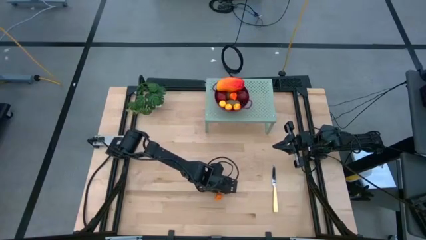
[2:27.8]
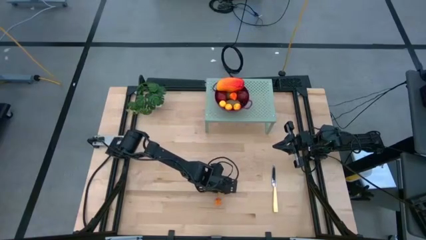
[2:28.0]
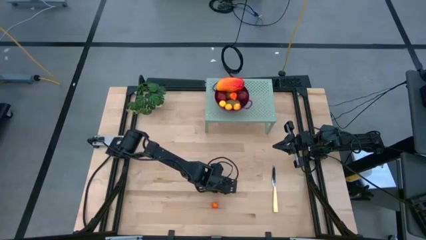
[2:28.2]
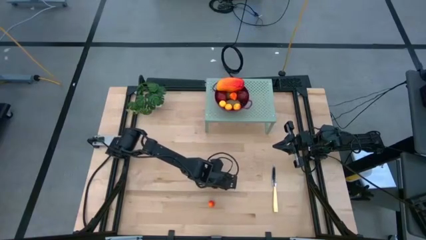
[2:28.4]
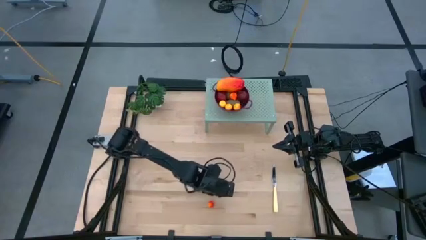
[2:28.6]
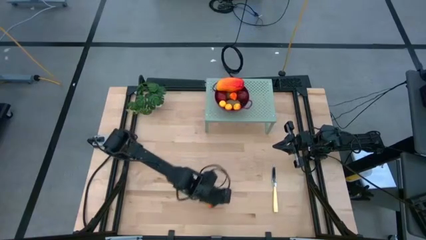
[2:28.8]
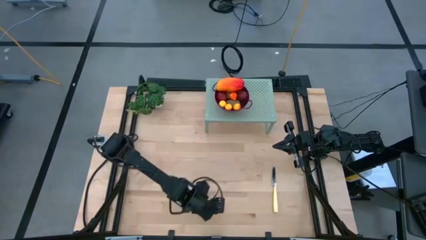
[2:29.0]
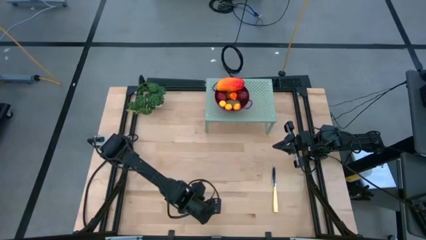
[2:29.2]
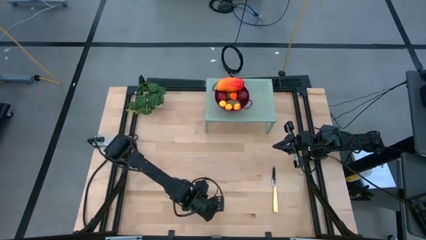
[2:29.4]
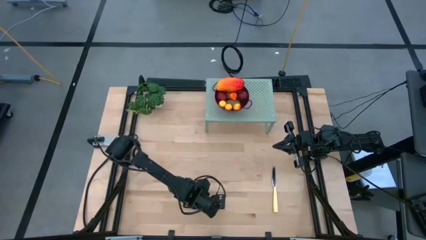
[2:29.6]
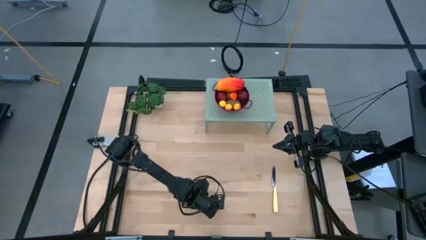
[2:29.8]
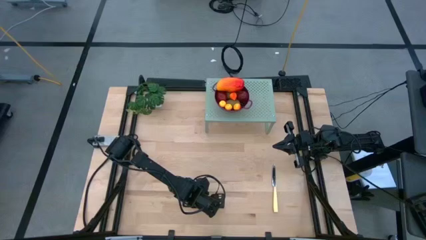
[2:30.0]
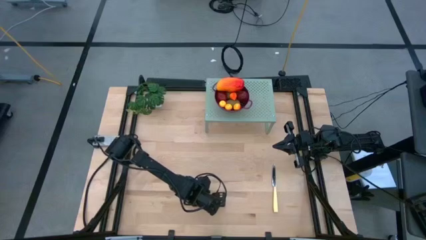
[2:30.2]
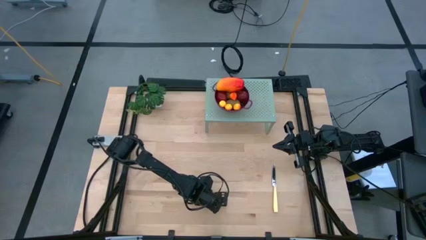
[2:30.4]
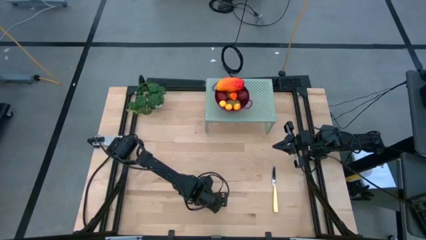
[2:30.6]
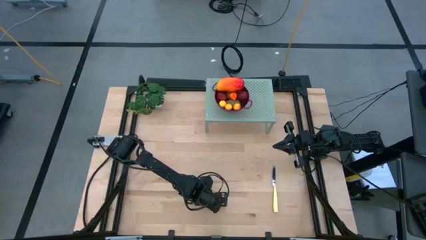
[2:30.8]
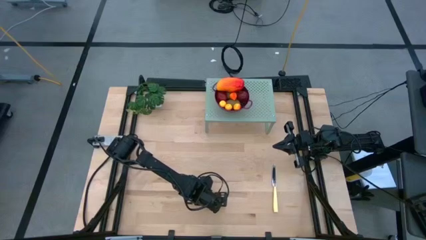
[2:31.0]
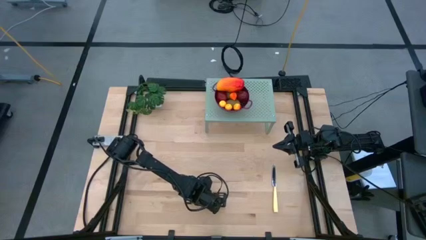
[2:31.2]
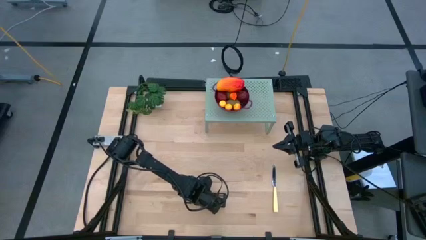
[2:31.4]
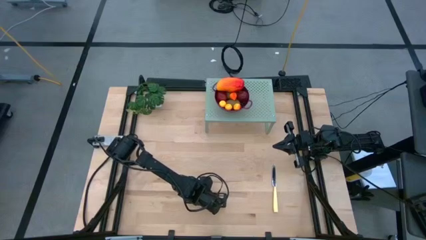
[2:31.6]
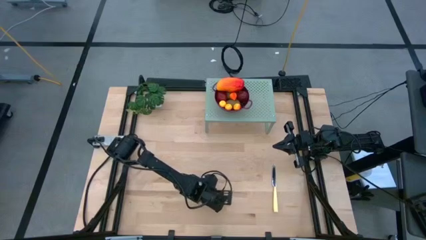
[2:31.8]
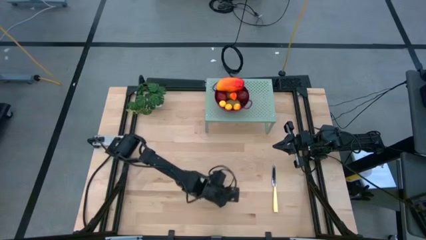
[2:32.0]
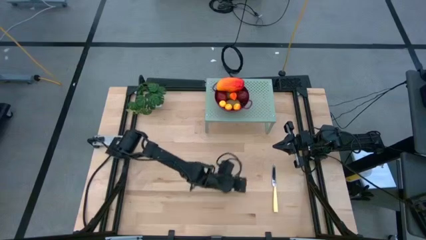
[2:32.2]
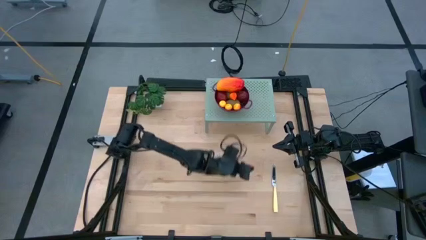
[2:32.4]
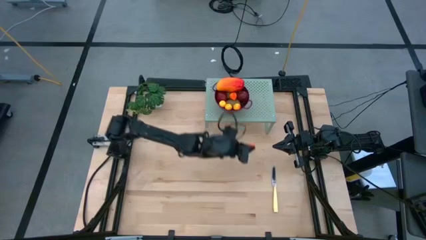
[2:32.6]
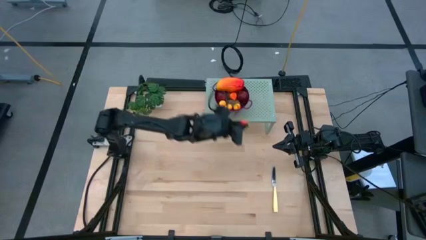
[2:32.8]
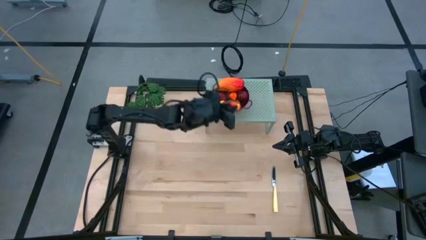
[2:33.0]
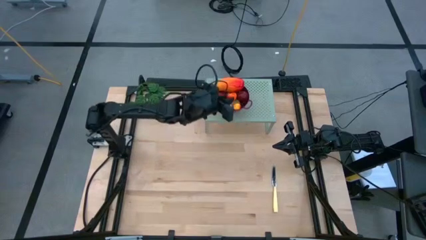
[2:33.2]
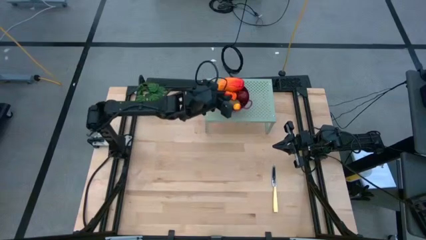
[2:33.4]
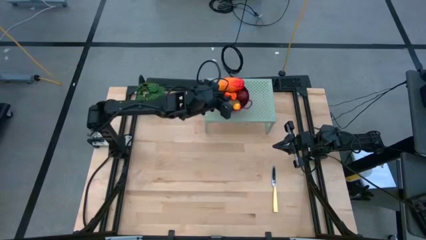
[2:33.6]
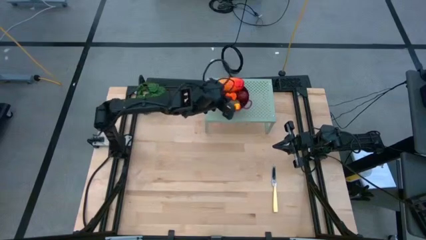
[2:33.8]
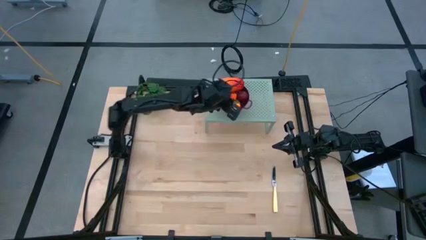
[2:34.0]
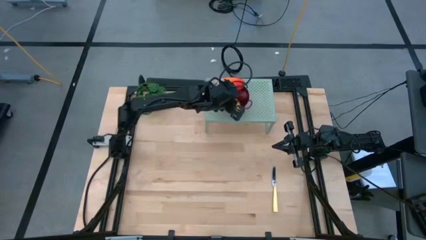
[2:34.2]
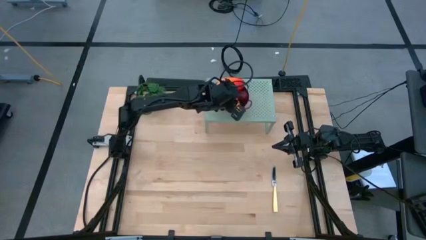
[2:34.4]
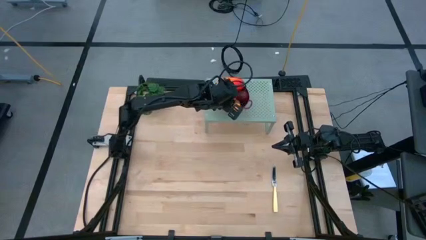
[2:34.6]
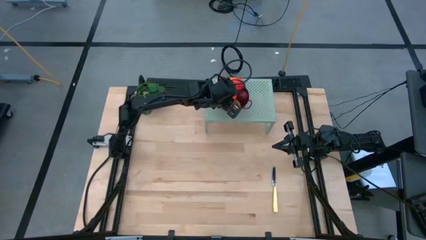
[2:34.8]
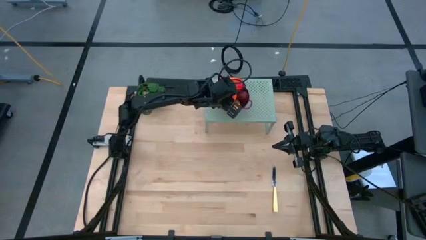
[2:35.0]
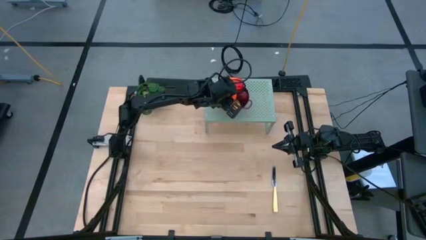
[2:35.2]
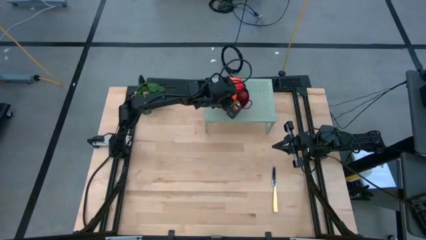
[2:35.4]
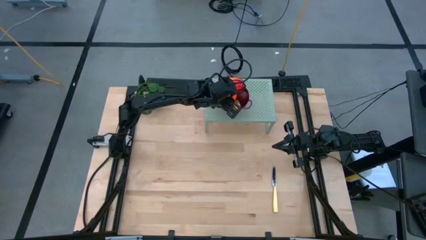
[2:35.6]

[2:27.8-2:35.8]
Task: Pick & Place Fruit
Put the peach into the strainer bowl on the shelf

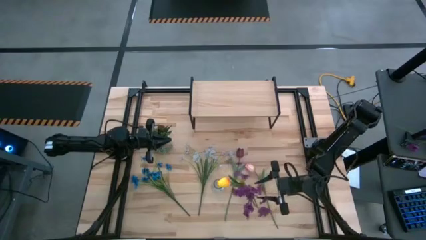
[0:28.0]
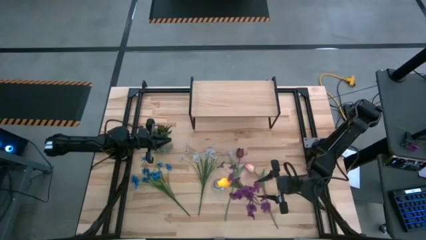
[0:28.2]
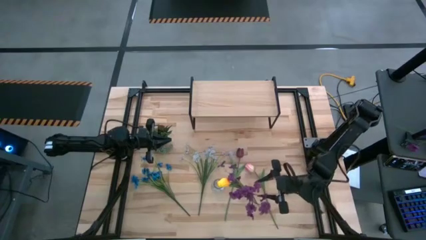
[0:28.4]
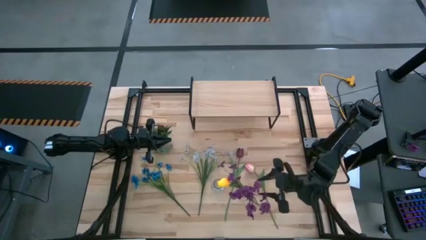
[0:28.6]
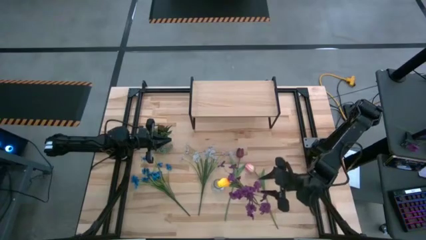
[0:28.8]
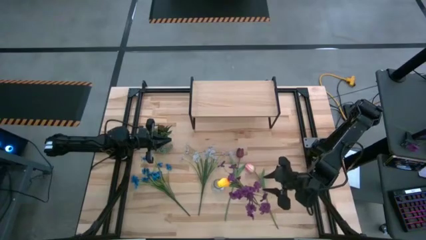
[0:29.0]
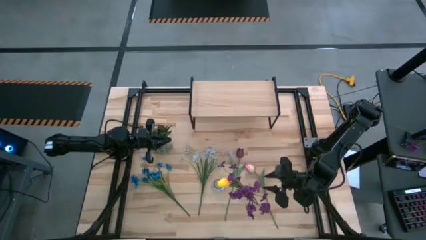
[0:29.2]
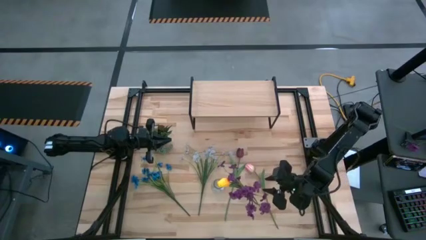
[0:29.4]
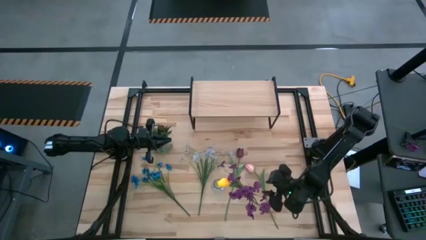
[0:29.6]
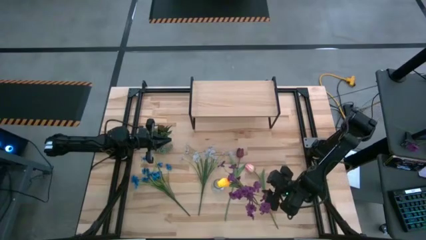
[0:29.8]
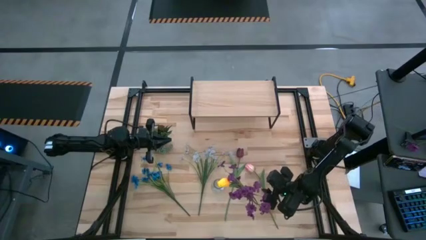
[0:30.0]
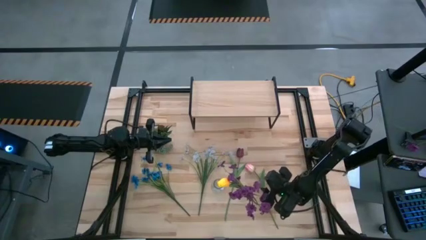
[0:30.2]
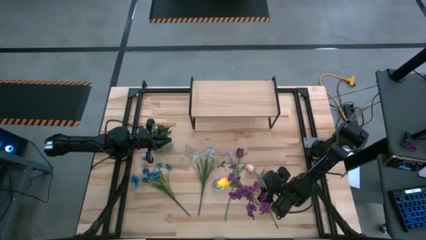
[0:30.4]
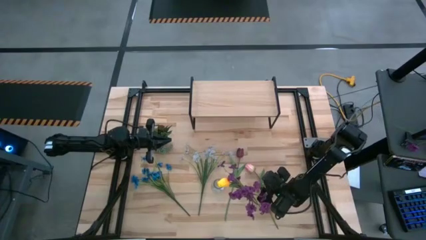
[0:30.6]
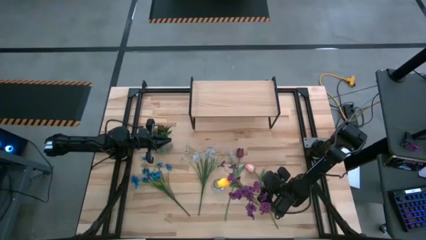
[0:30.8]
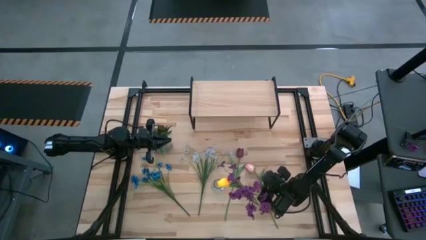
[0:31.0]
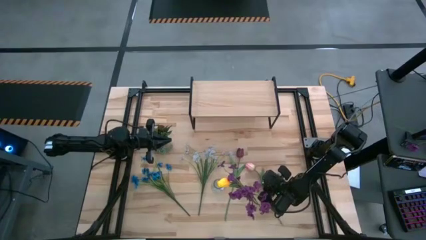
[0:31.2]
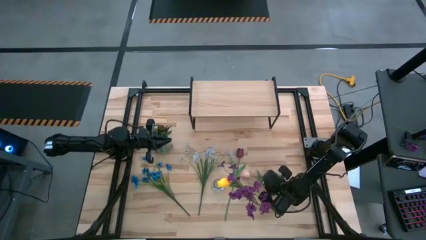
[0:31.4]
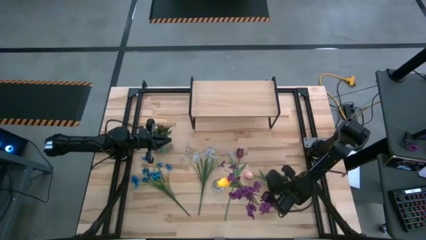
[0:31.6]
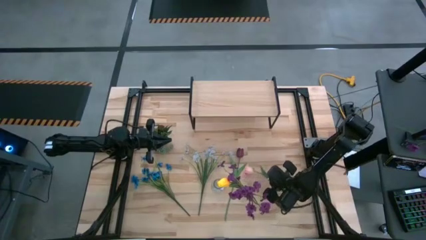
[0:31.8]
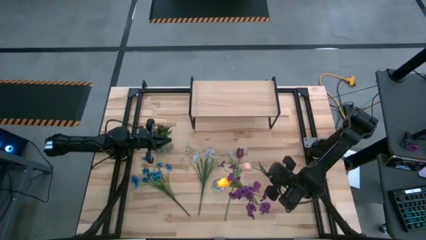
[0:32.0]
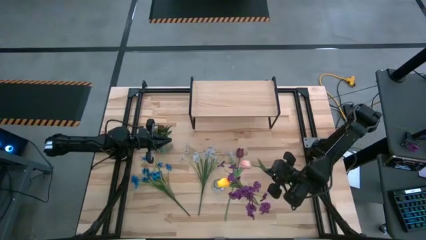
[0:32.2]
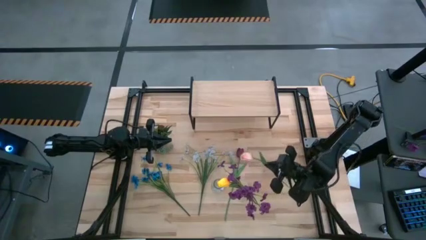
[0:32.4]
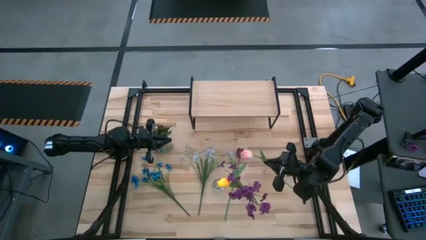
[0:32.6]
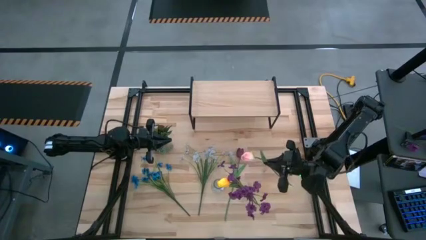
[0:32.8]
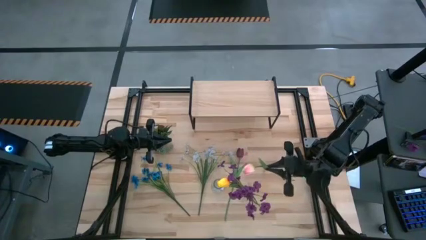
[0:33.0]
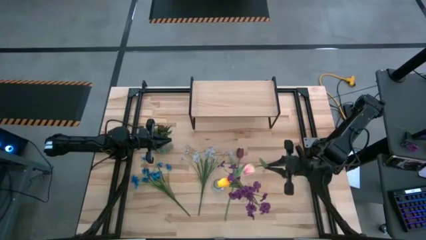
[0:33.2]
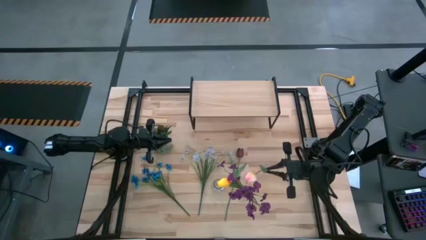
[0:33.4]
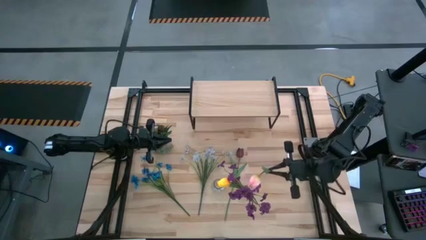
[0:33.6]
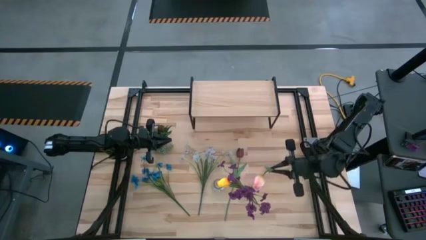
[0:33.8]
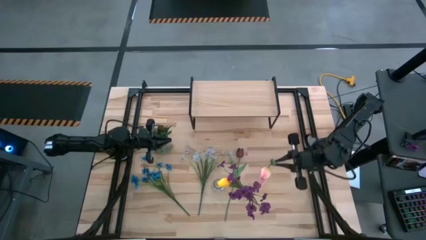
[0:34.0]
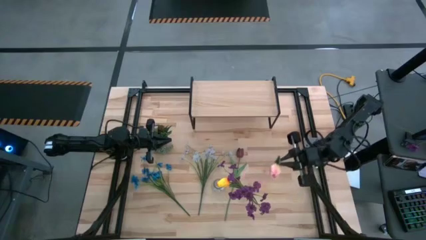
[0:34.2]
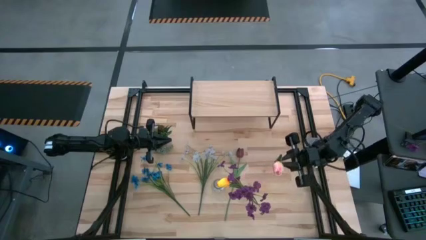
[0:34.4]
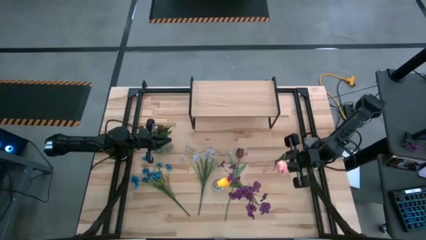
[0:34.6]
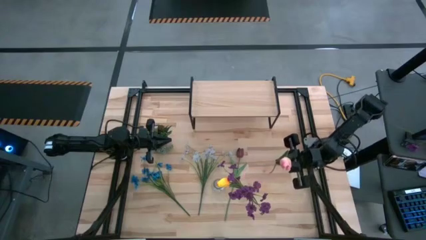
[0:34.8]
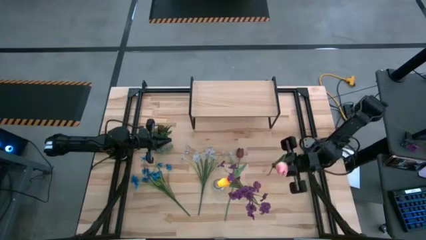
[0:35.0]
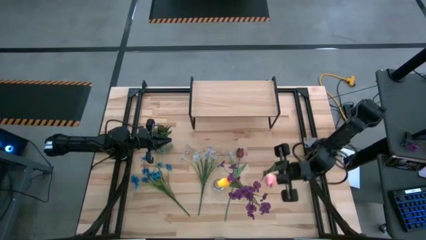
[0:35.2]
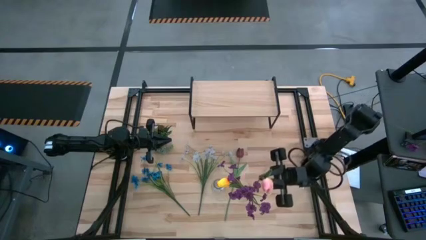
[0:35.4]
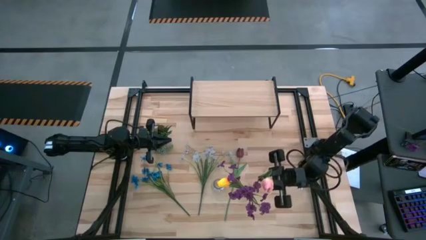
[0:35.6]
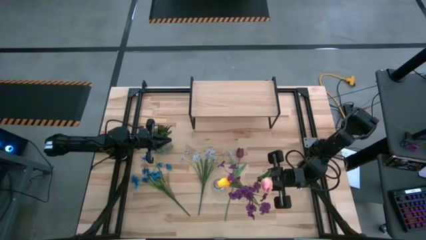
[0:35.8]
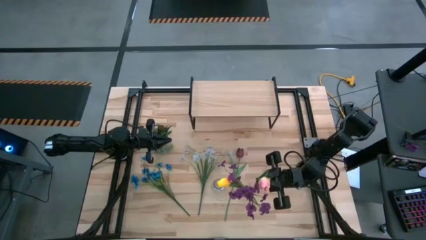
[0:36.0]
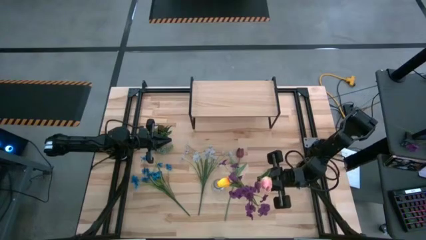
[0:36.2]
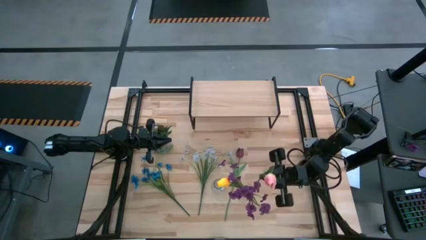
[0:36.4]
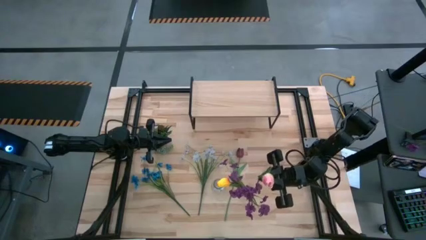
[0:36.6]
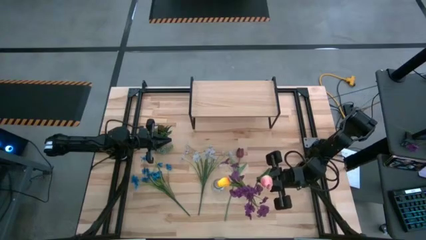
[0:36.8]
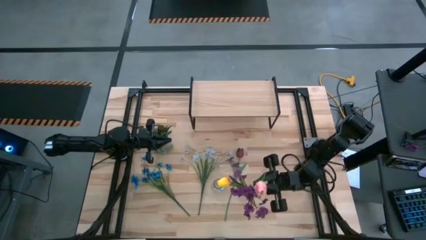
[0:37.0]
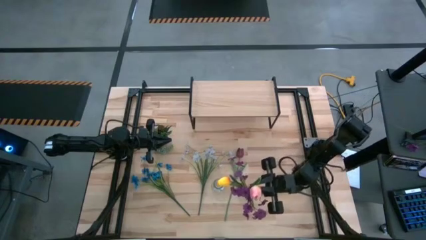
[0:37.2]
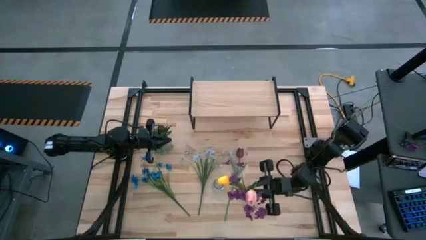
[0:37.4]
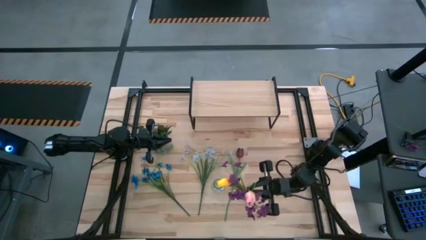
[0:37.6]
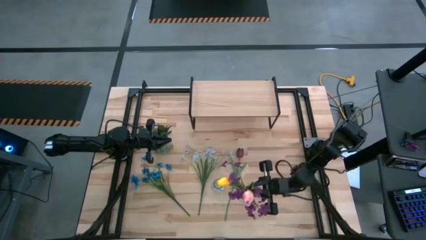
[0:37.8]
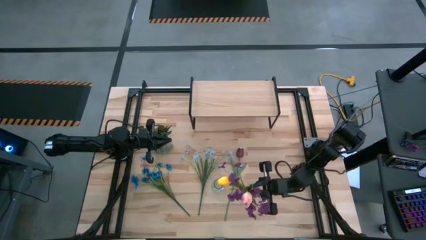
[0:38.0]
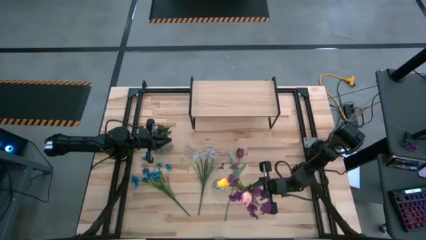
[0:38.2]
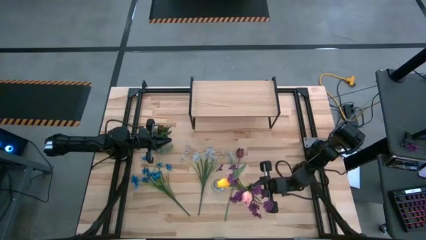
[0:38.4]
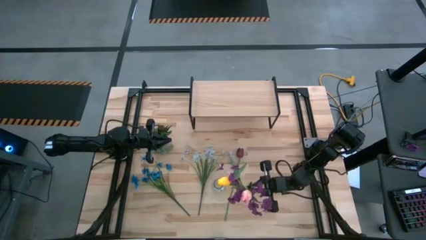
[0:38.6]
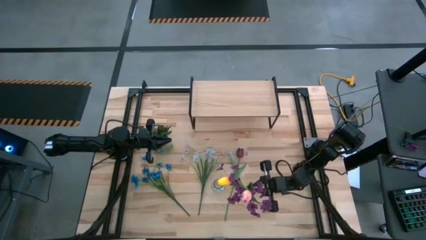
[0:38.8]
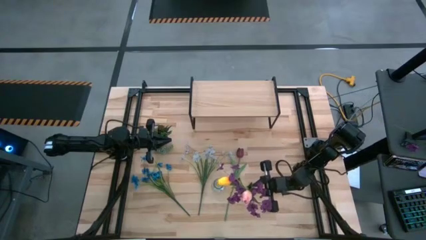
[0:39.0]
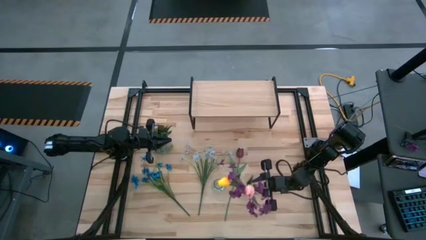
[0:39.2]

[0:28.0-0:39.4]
Task: Pick and place flowers into a vace then onto a shelf
Put the pink tulip into the right transparent vase
